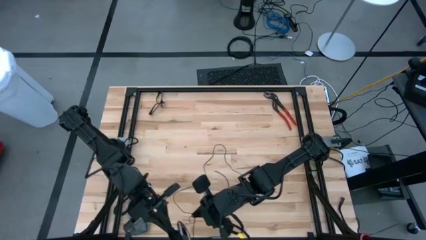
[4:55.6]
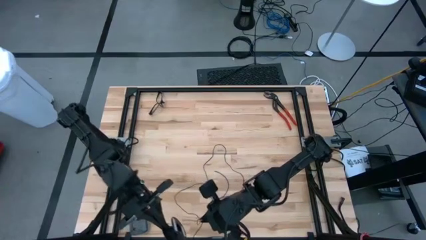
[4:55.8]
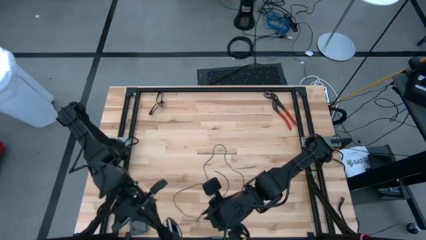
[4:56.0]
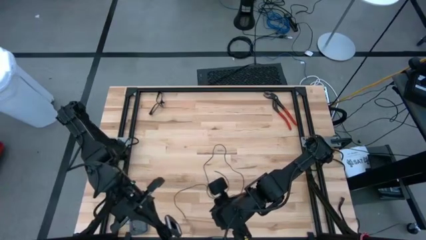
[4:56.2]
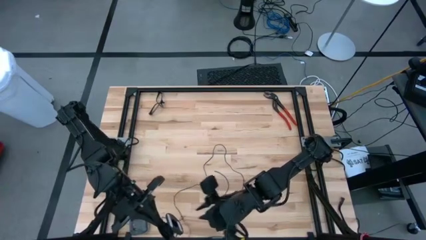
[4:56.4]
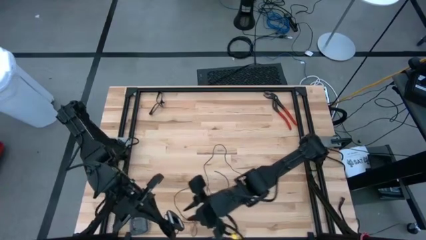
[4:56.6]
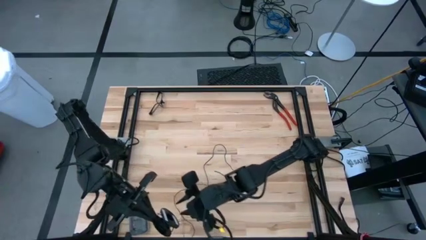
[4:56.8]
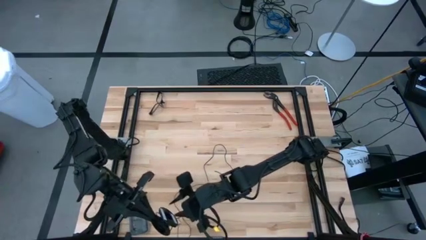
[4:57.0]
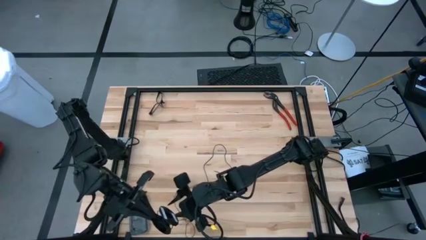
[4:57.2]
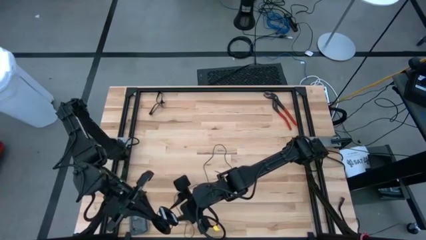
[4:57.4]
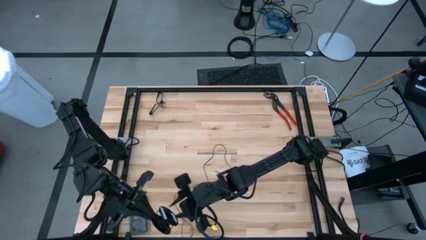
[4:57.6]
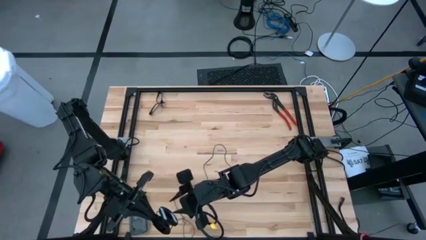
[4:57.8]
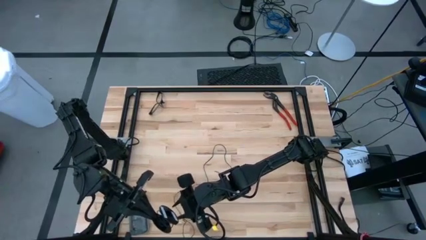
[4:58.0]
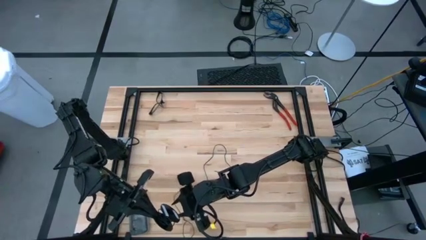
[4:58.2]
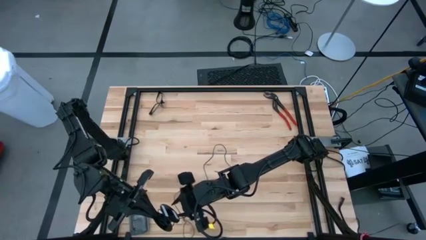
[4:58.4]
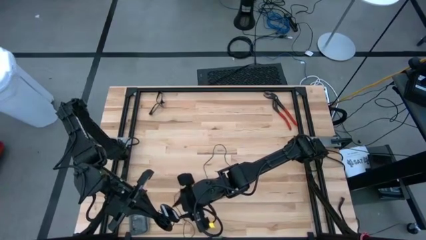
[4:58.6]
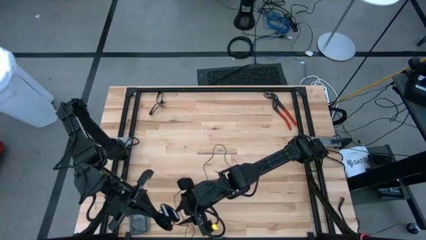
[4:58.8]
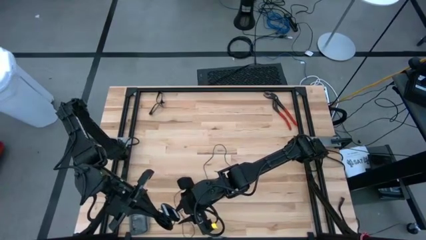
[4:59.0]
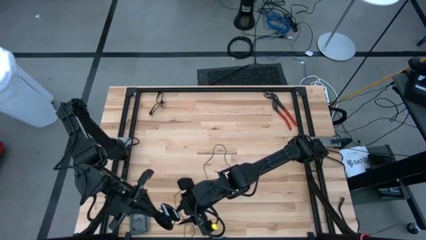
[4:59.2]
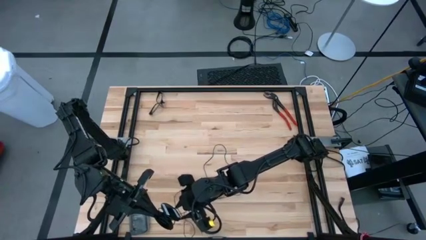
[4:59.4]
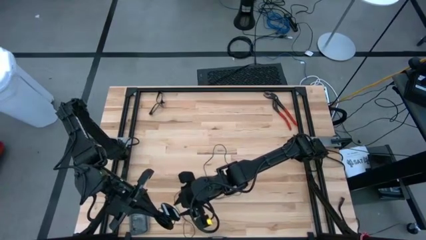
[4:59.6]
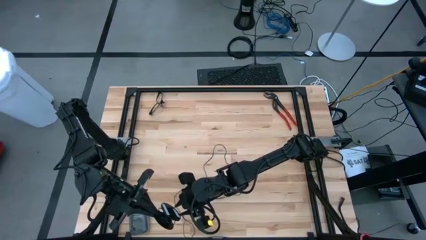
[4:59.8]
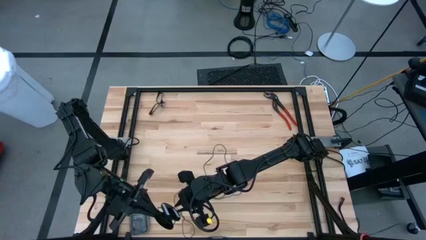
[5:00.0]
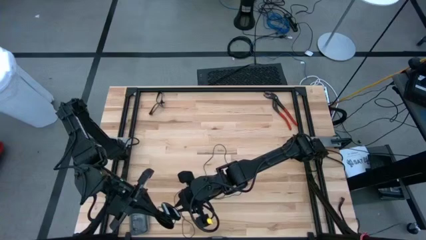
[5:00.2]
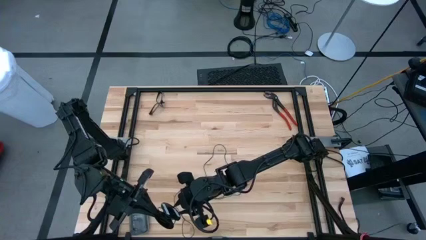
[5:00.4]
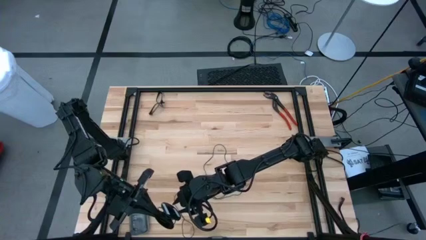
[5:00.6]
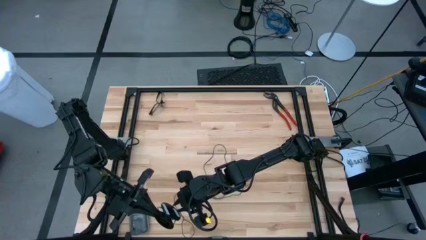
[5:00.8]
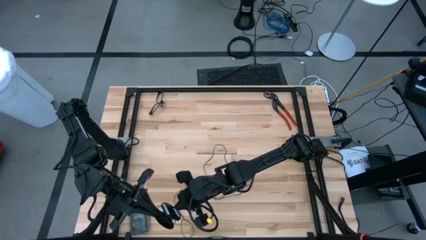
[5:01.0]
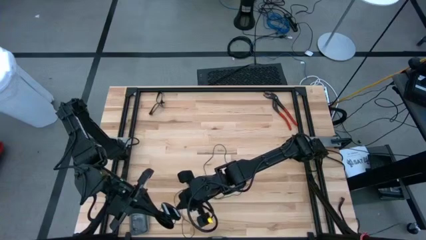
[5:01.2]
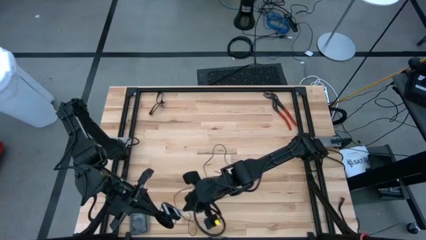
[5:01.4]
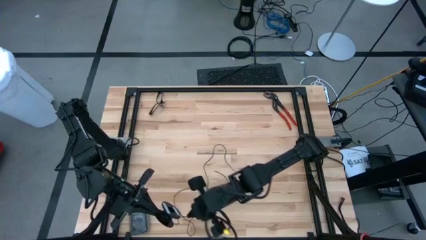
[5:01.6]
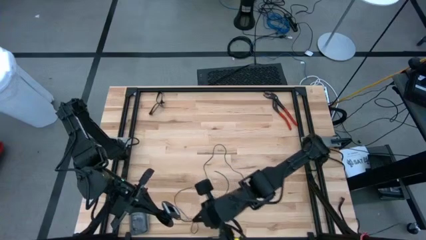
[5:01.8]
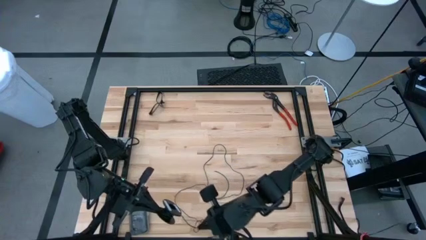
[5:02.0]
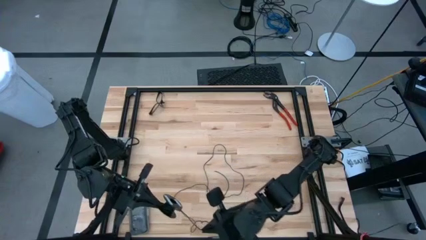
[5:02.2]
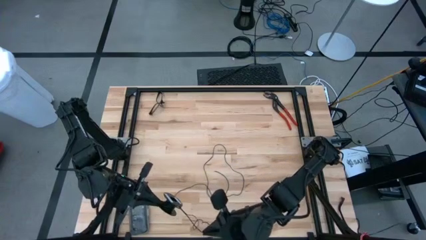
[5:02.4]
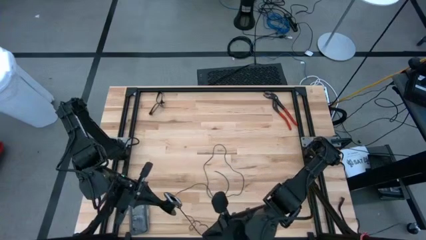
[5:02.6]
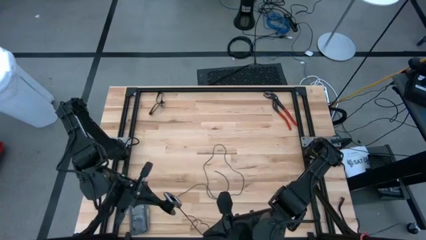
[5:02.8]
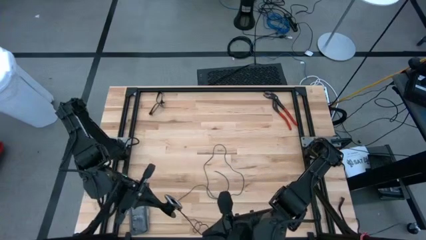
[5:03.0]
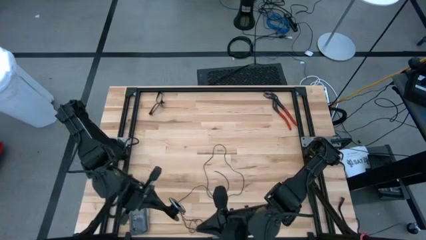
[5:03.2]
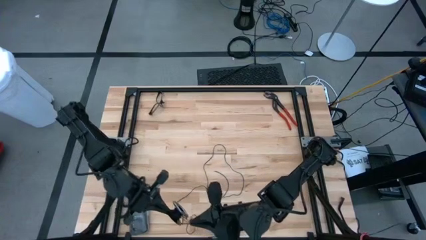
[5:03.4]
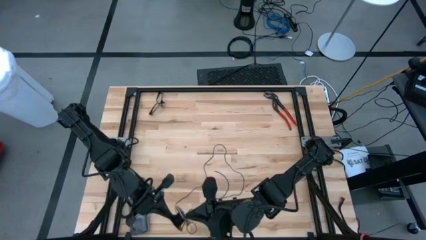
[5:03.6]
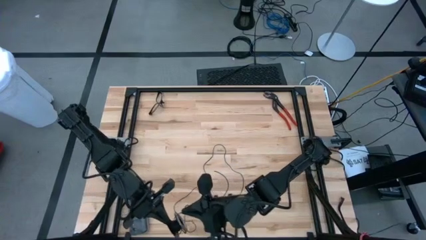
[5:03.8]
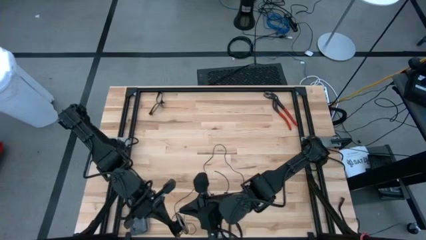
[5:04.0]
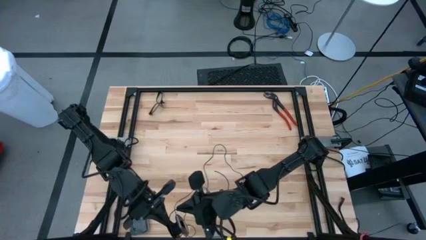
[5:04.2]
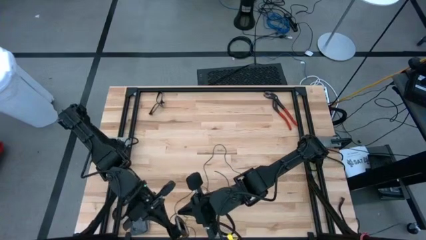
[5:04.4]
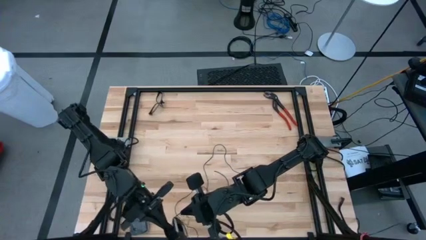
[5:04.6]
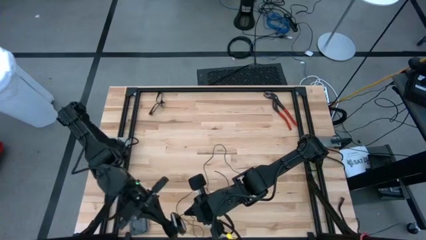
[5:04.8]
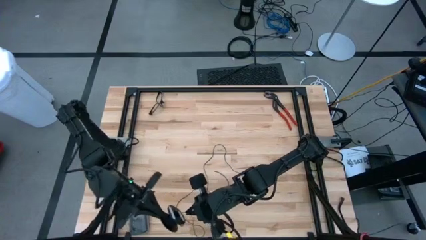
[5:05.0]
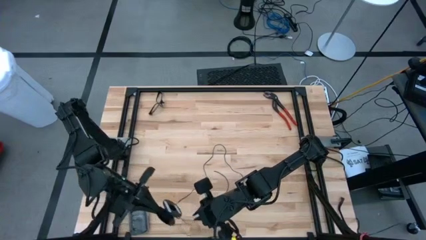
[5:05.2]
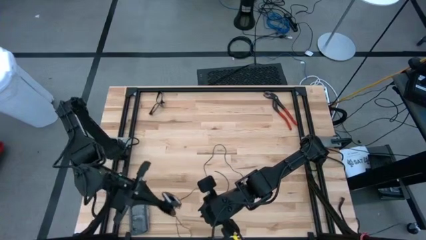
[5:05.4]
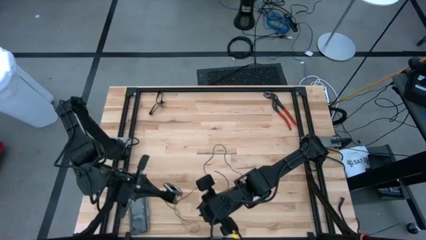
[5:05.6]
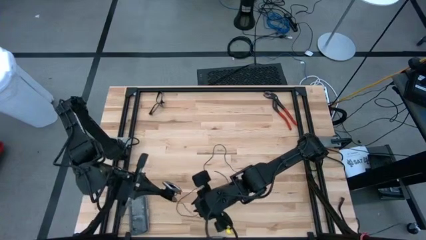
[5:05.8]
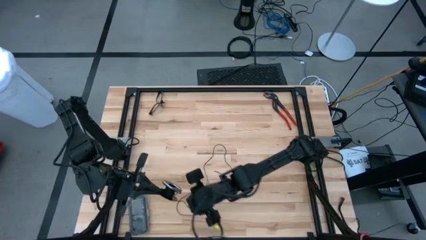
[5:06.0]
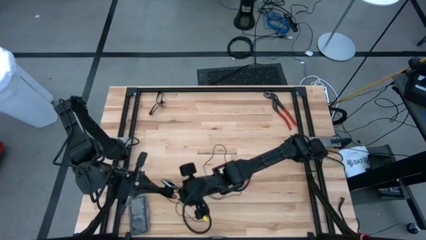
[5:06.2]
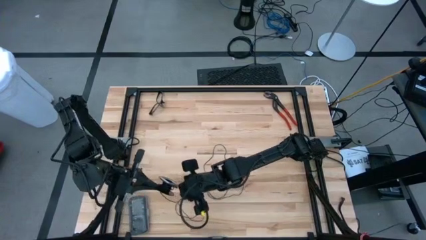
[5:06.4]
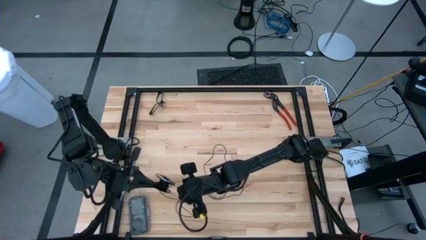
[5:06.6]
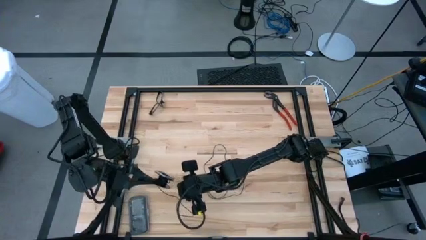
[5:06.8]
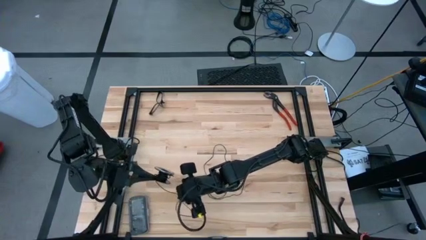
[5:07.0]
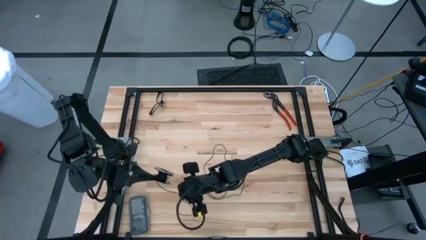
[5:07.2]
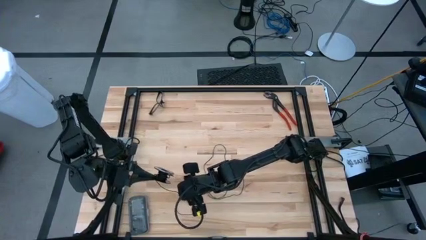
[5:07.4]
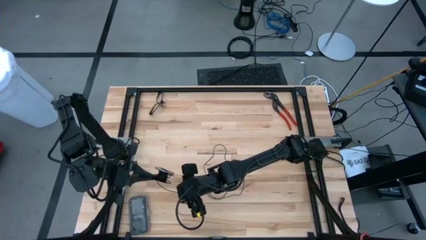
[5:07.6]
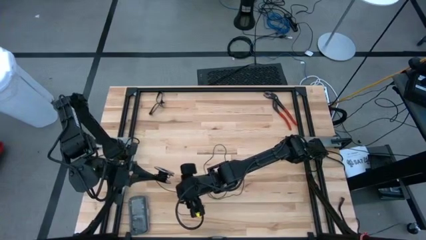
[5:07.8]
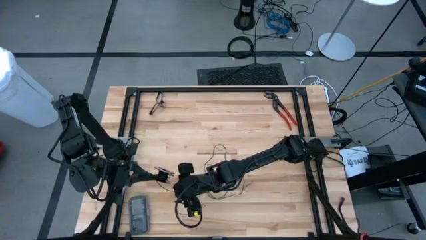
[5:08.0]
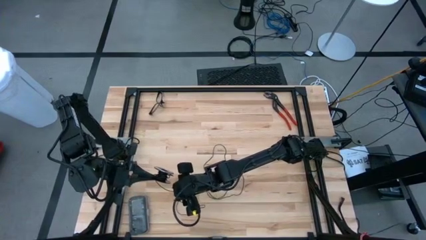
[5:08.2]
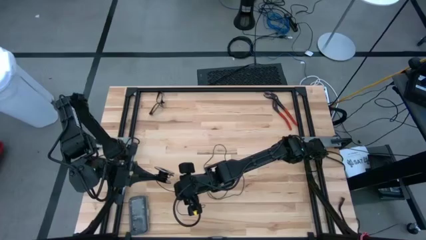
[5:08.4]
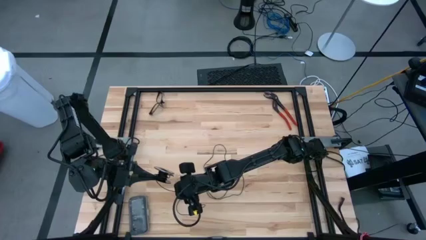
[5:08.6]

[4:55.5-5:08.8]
Task: Coil cords
Coil the black wire onto the spool

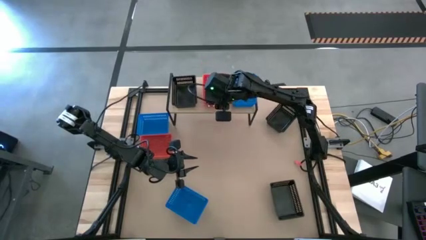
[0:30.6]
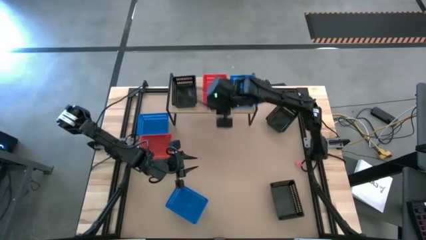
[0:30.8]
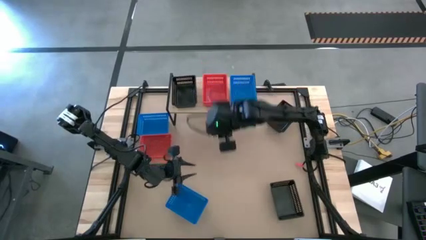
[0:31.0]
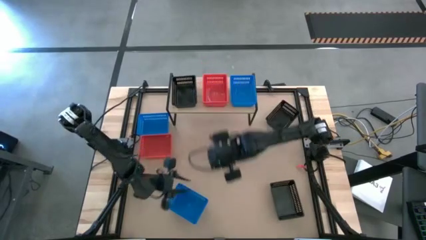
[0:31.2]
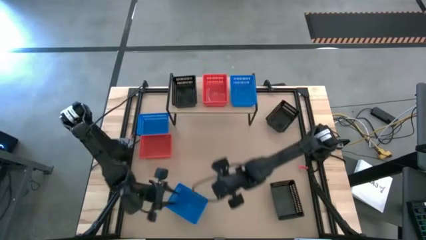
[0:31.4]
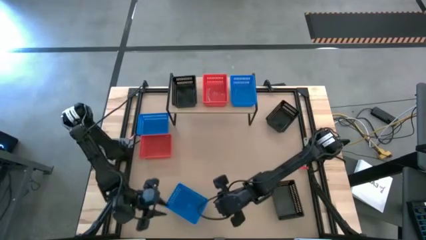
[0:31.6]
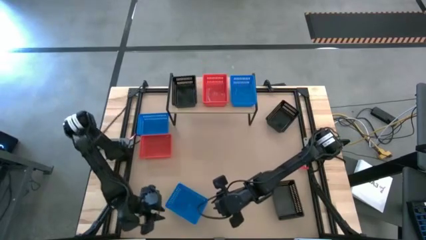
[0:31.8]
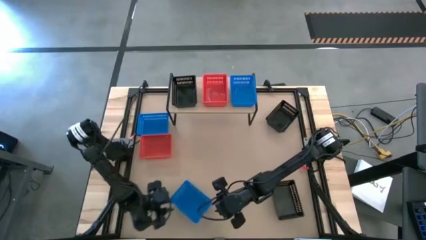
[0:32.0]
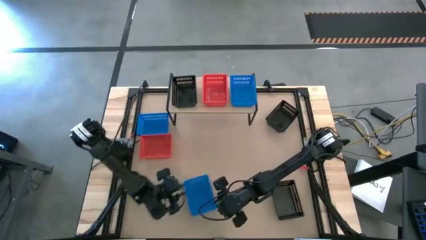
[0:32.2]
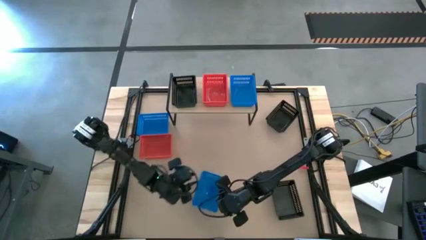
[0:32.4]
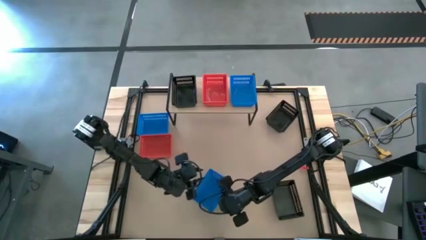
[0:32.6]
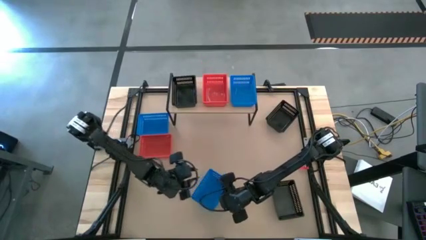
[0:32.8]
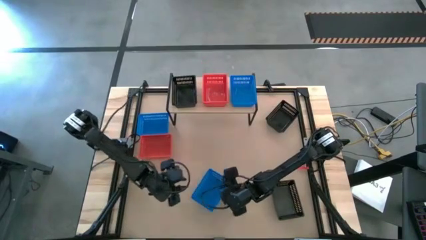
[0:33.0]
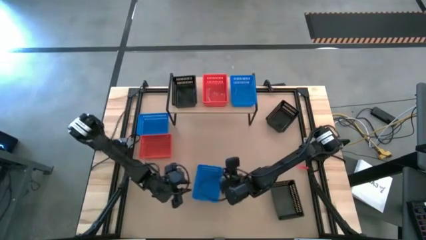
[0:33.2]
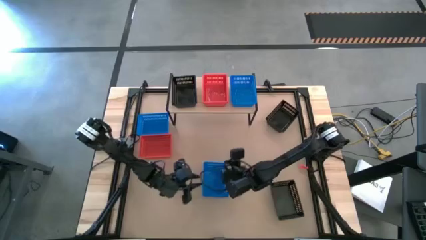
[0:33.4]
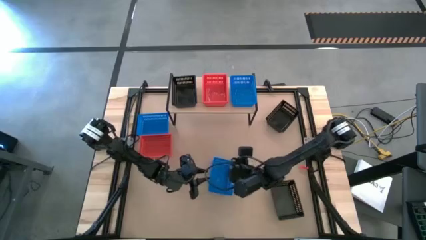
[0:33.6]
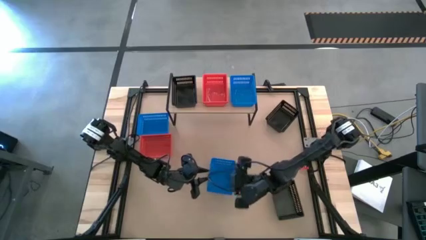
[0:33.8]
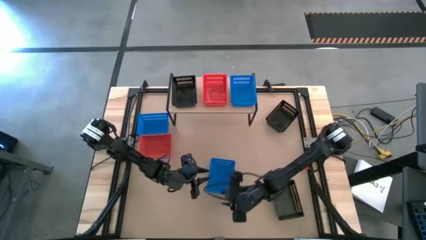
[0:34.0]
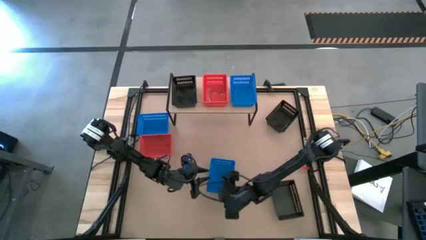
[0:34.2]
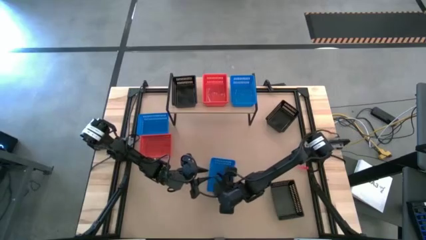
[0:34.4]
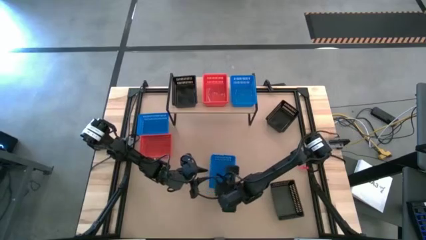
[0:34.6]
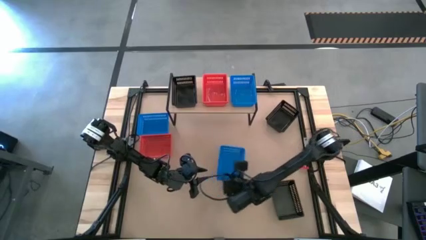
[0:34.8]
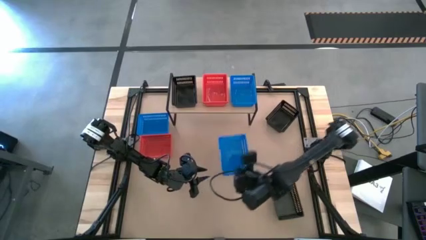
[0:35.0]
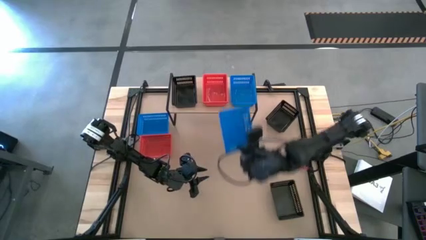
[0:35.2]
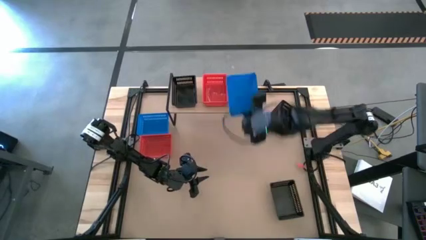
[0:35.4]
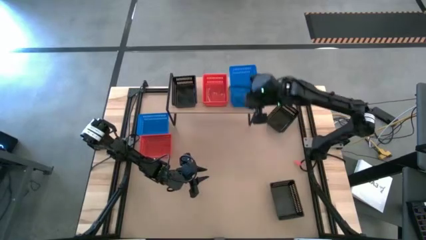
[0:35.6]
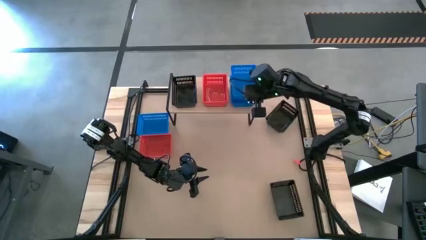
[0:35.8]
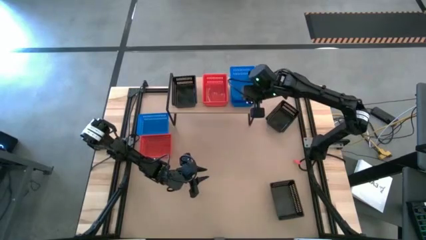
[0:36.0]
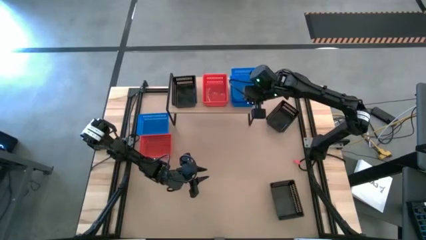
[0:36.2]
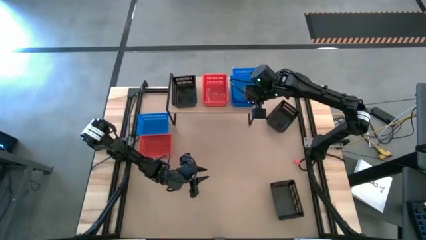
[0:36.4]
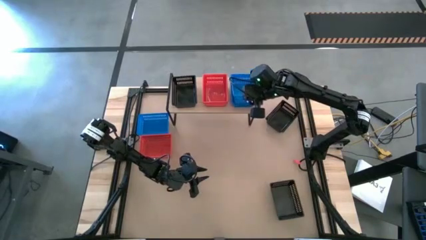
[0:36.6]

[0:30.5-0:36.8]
Task: Stack baskets on shelf by color
Stack the bottom blue bin on the blue bin on the shelf
